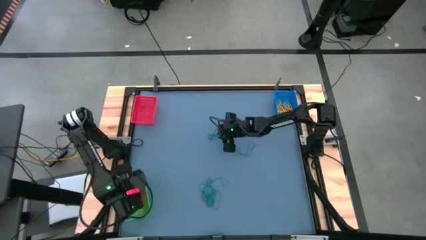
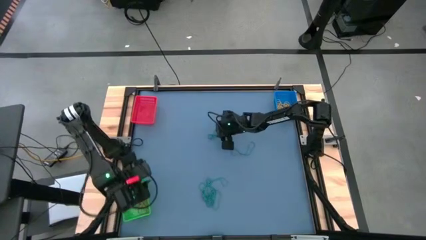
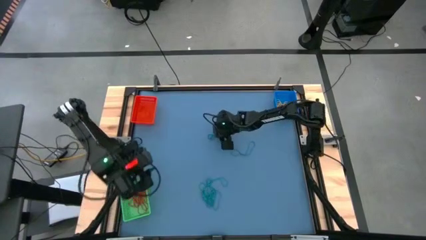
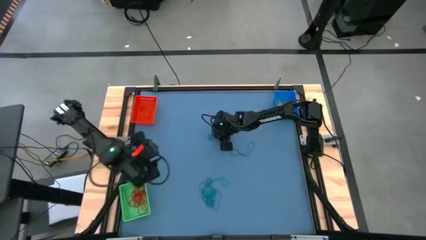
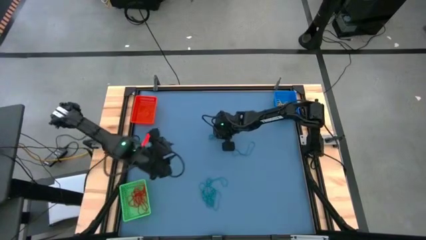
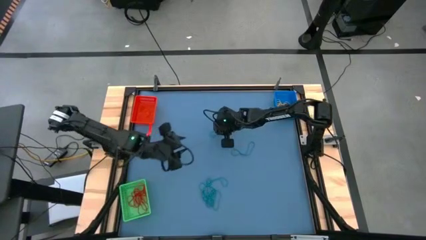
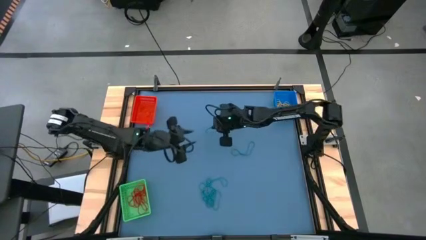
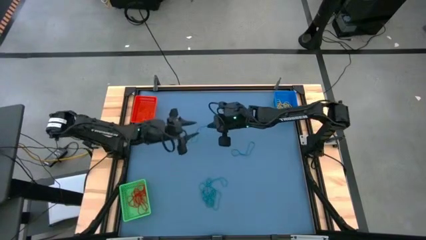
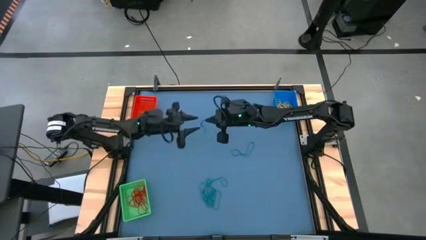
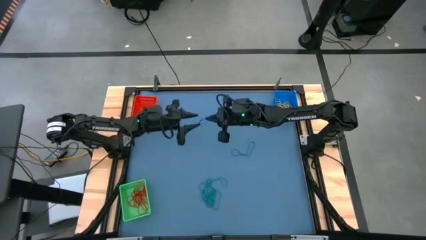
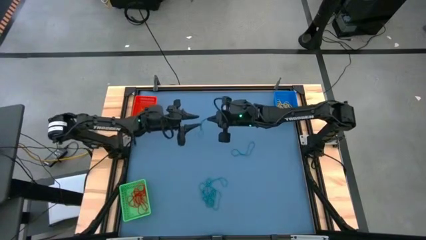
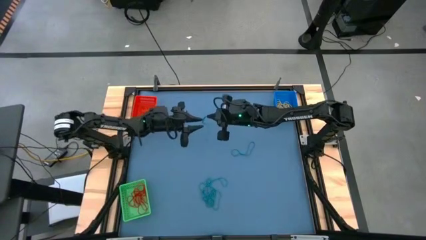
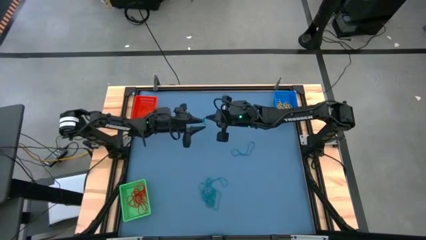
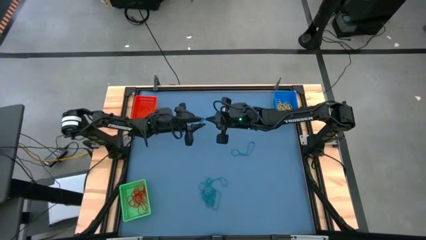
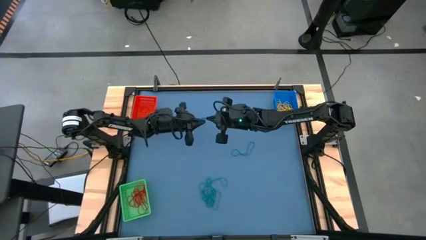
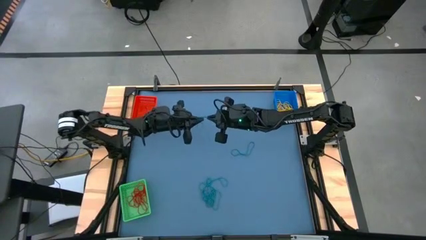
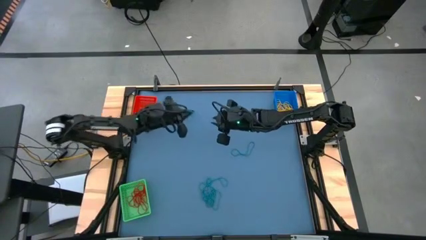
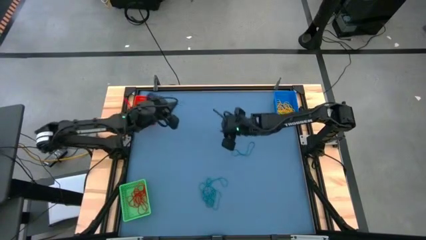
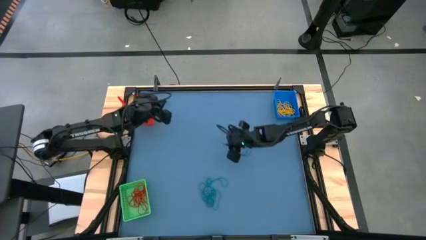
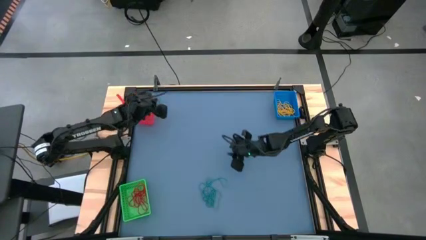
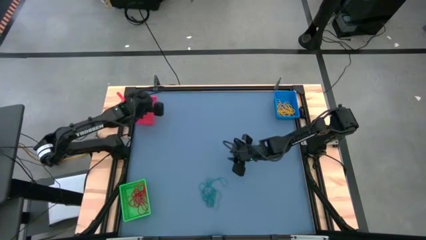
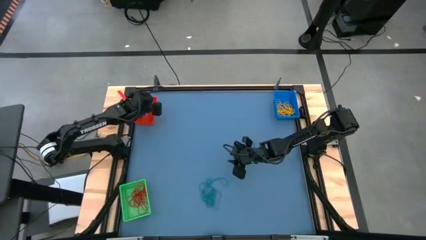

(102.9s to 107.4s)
Task: Sort rubber bands into baskets
Put the blue rubber band into the red basket

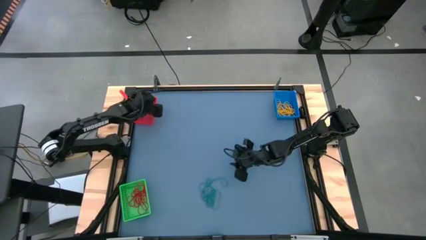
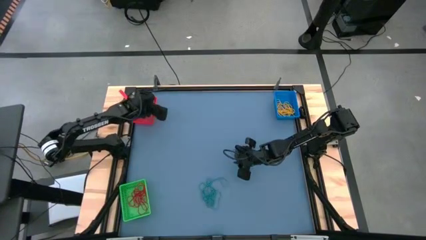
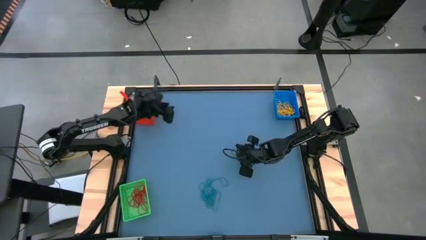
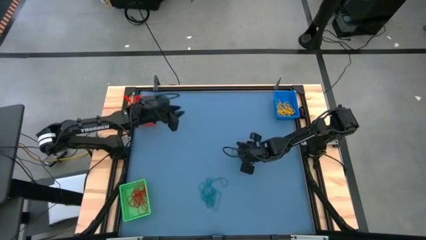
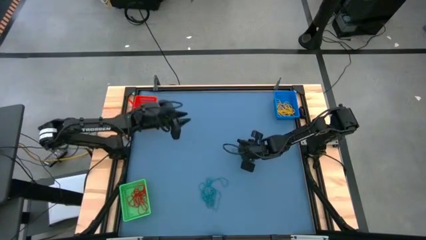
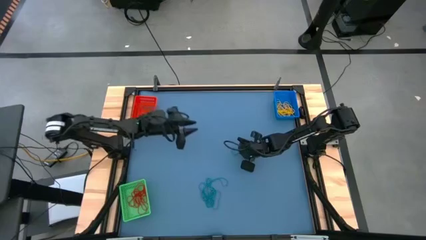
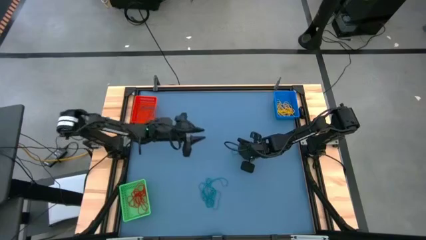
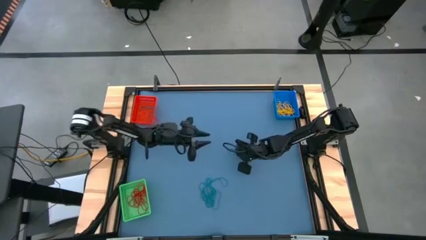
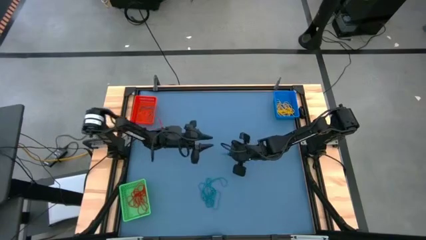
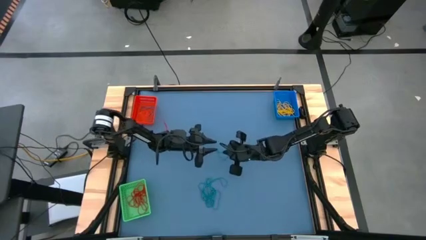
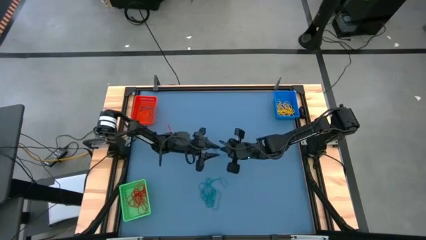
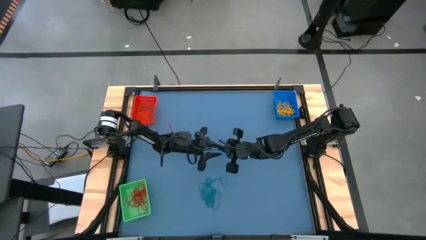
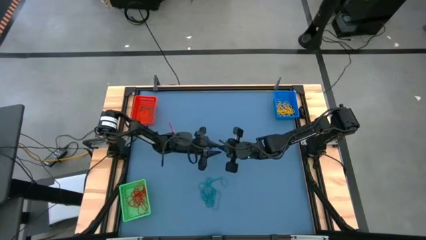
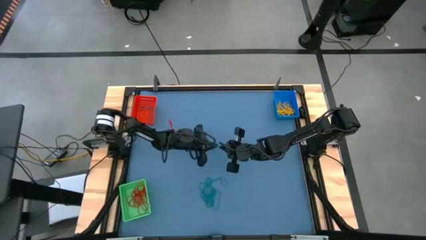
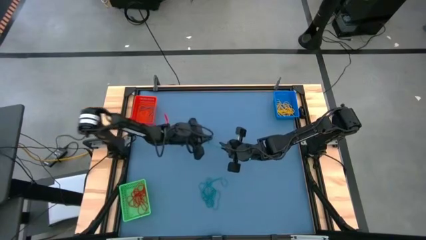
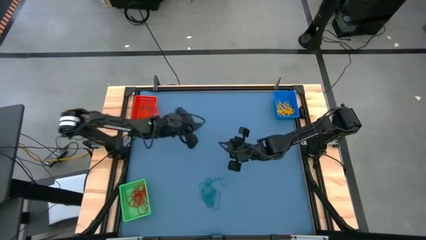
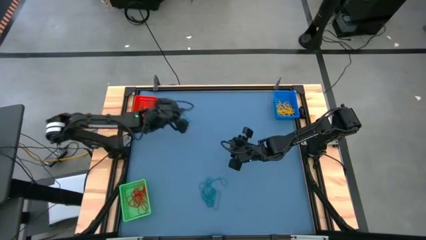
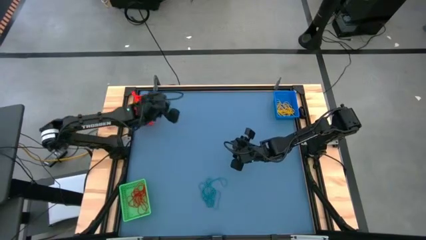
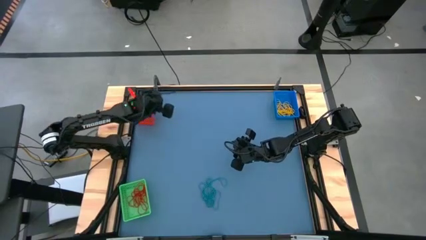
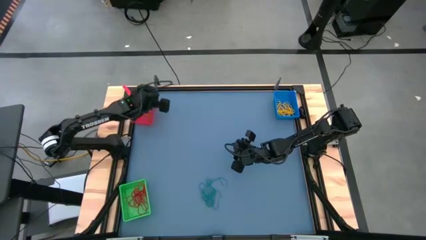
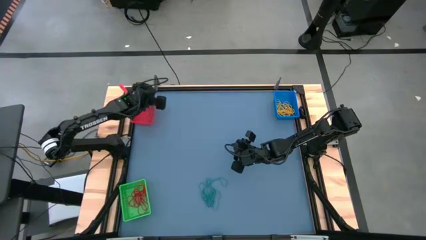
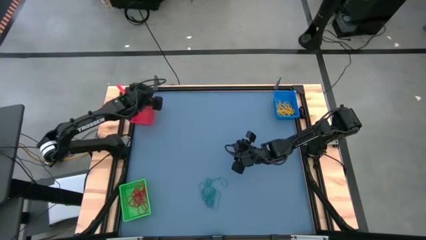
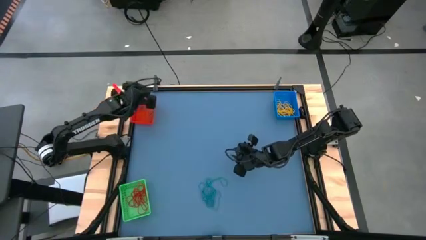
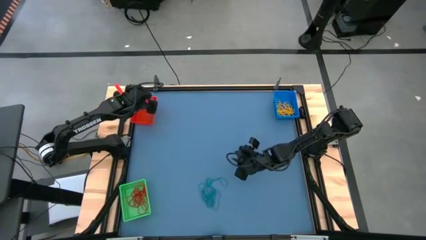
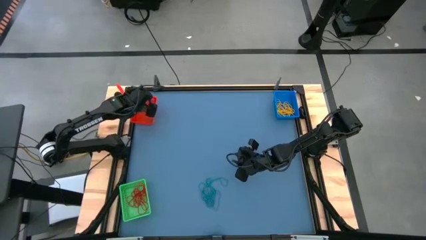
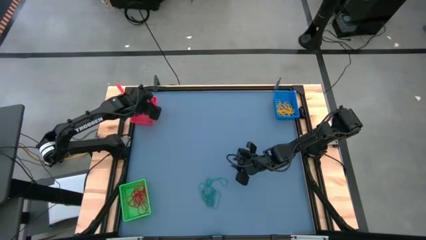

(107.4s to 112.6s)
Put the blue rubber band into the red basket

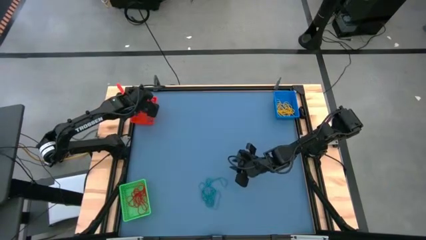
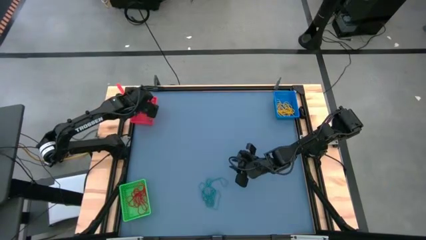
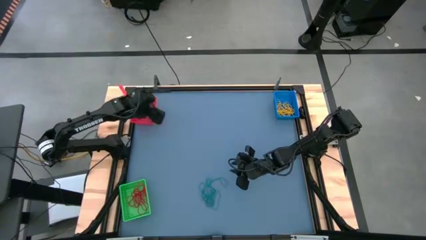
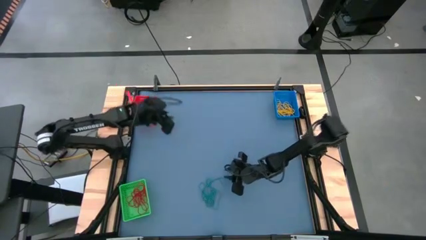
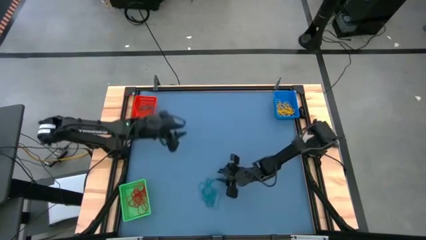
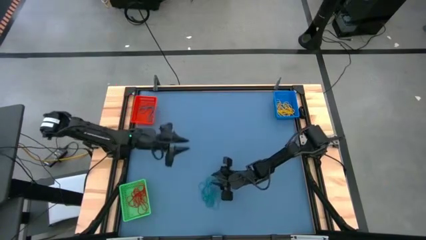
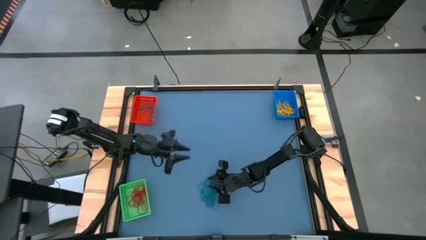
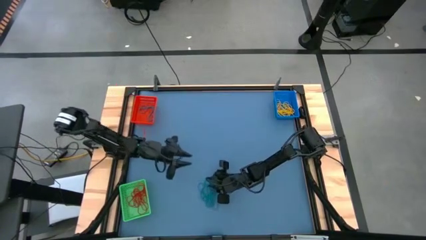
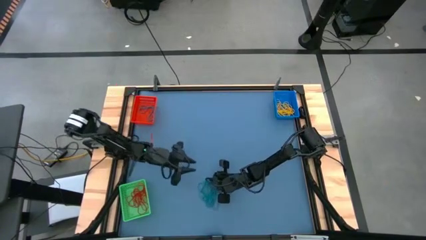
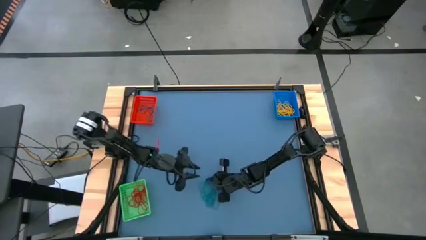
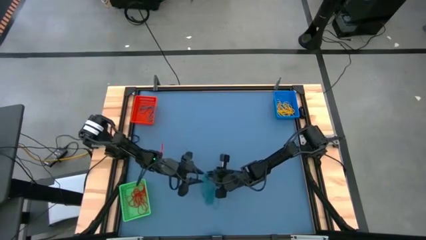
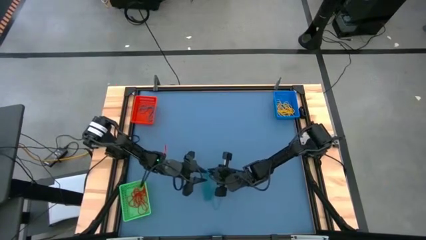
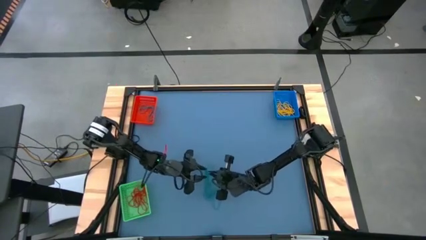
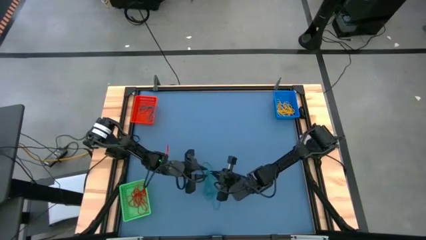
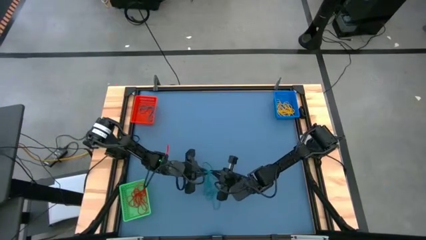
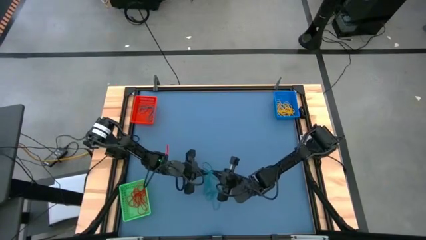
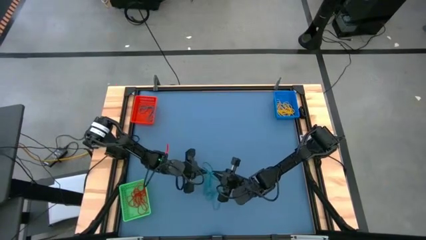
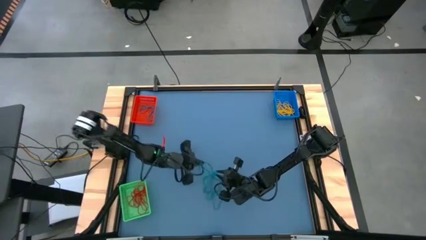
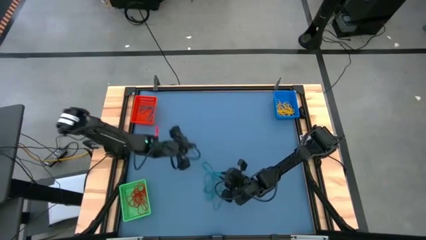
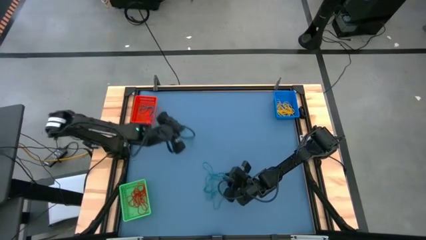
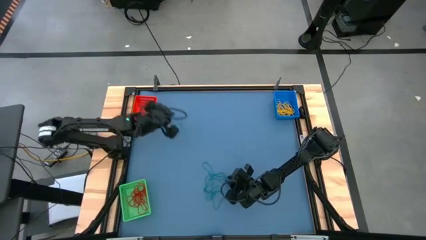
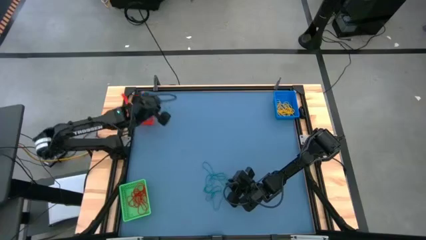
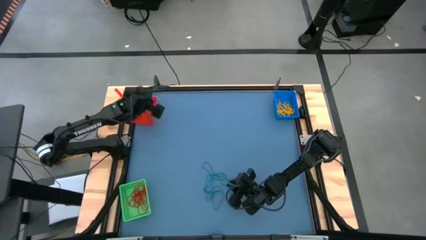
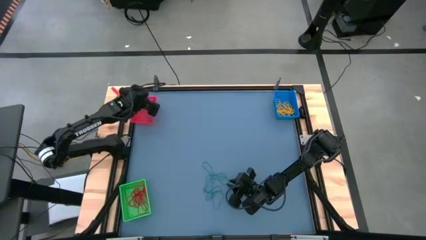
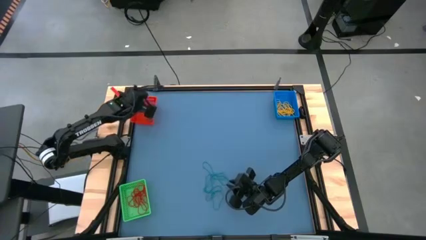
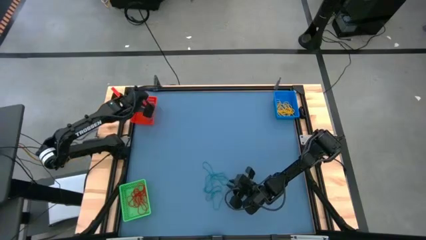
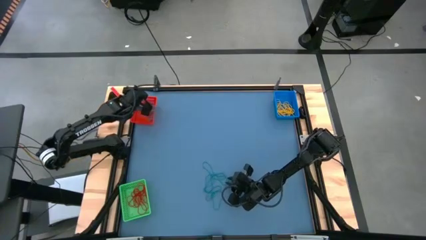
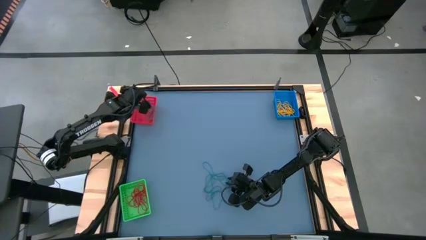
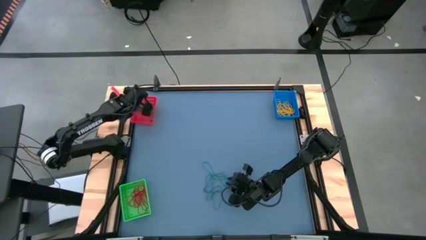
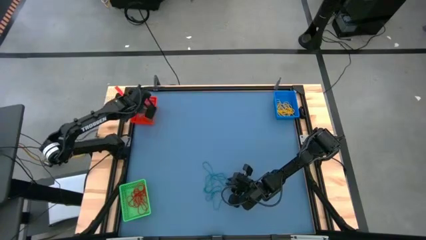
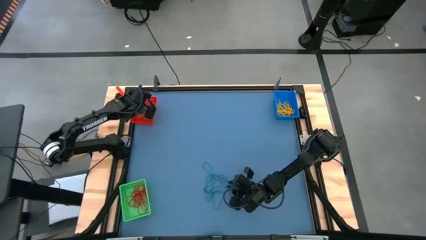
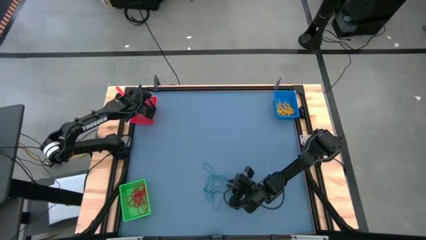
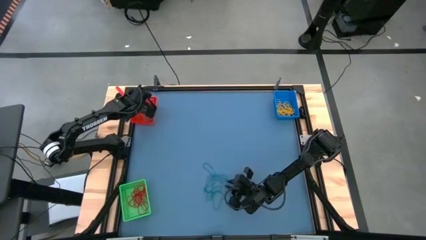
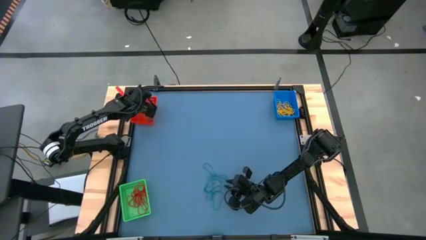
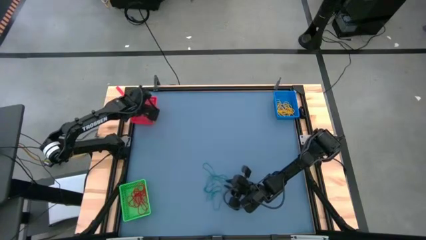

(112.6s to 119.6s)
Put the blue rubber band into the red basket
